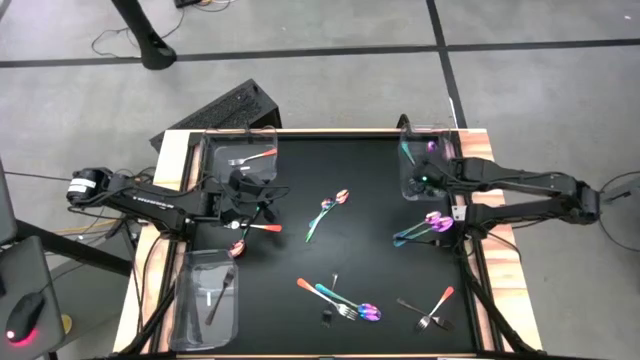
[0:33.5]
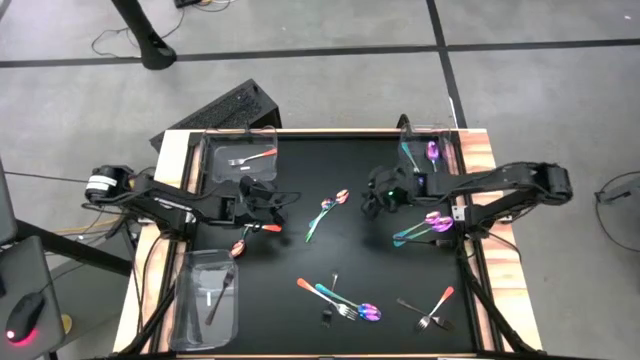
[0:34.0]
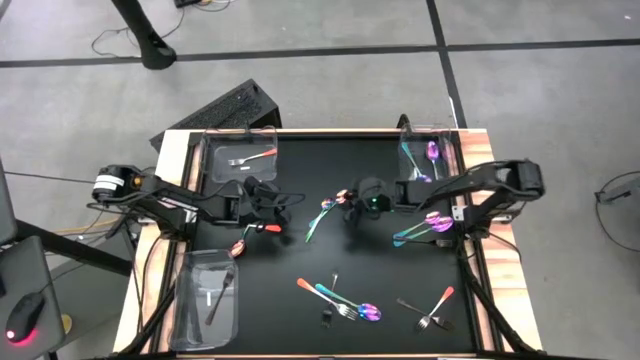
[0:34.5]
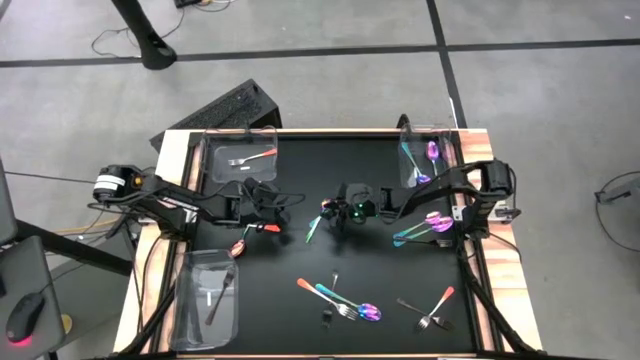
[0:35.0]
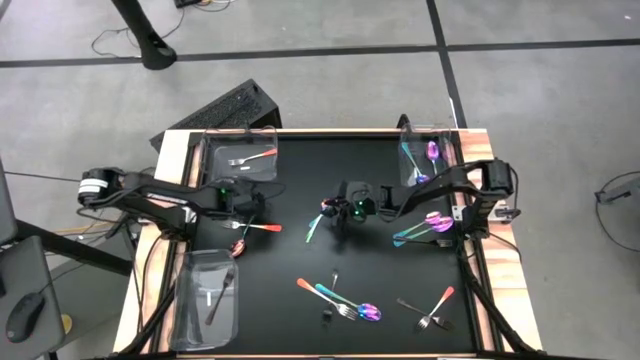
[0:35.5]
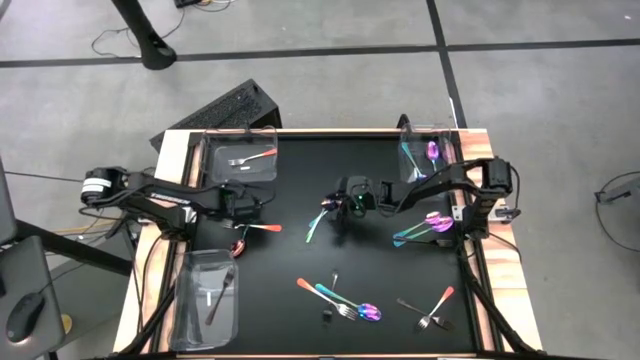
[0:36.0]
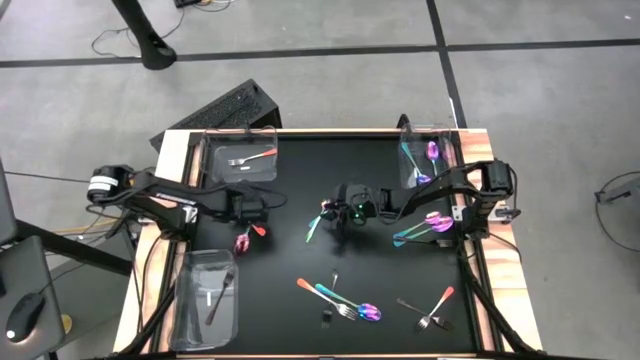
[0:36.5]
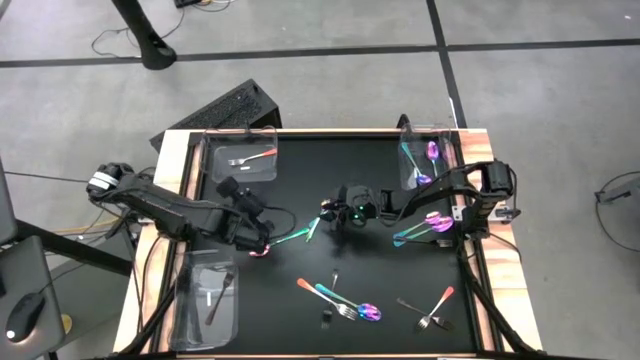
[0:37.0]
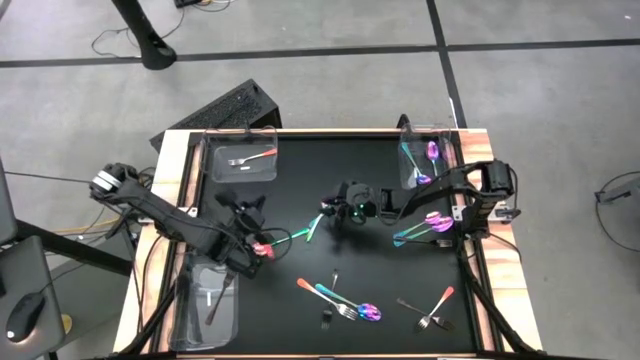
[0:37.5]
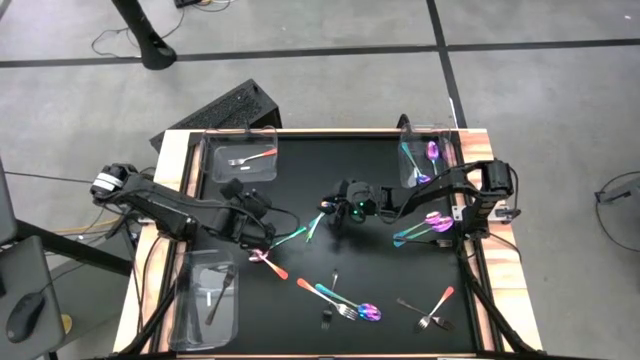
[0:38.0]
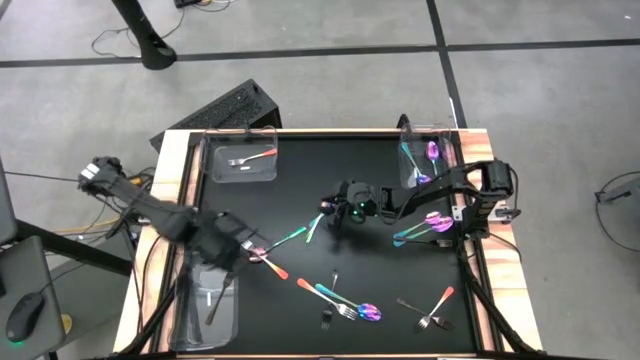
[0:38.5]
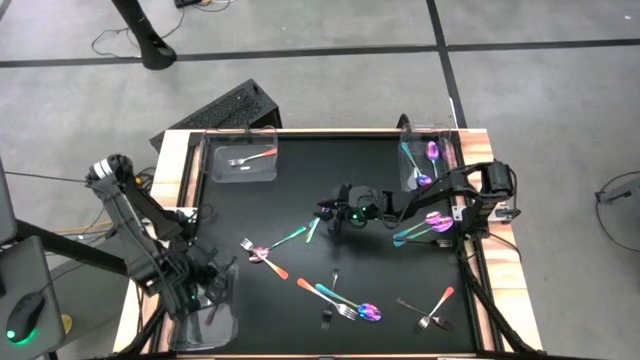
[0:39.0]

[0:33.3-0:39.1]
Task: Sort silverware by color (type)
Put the black fork into the bottom transparent bin

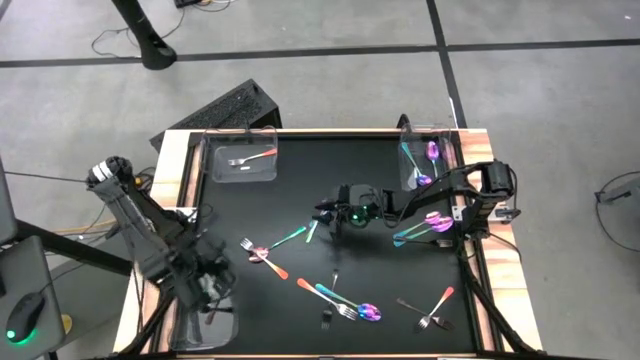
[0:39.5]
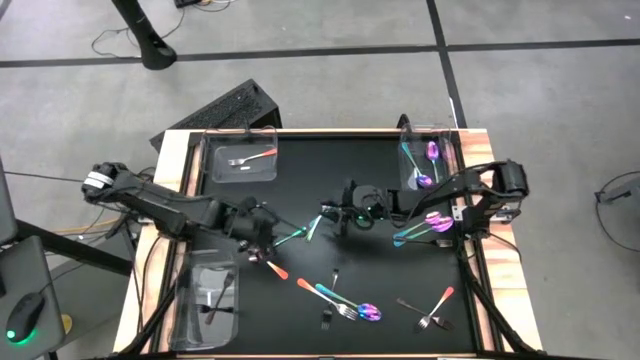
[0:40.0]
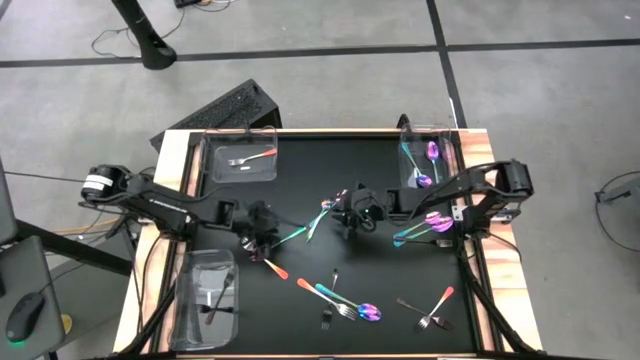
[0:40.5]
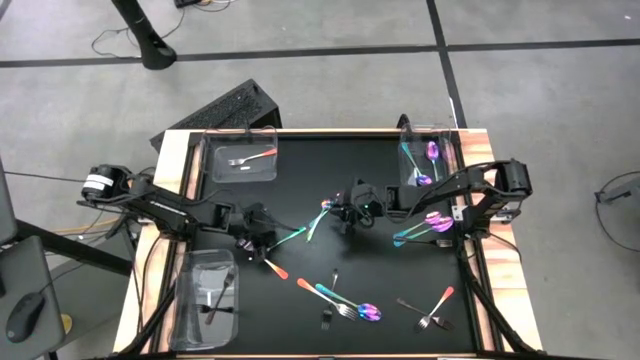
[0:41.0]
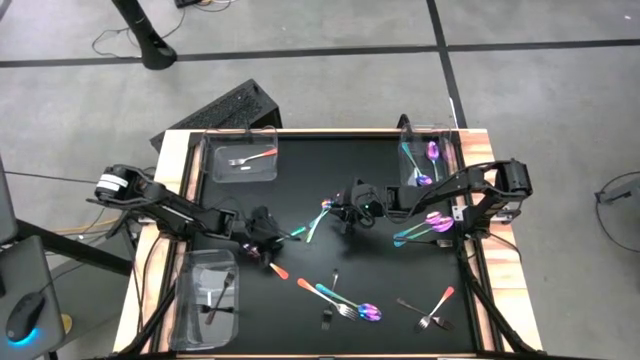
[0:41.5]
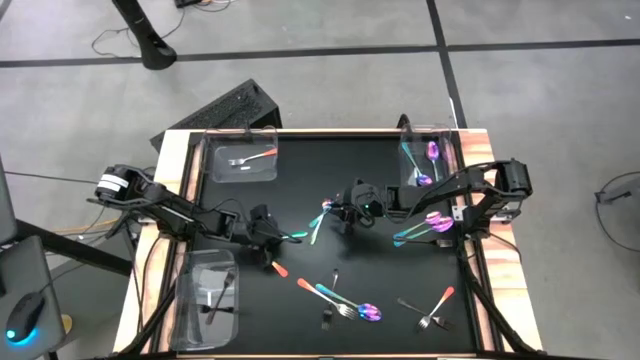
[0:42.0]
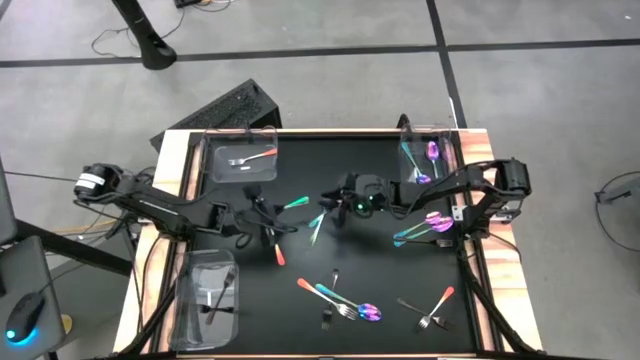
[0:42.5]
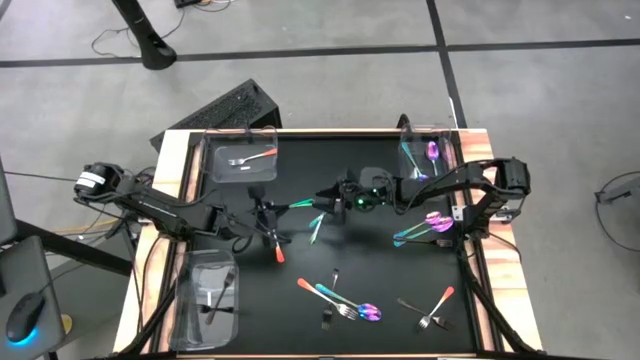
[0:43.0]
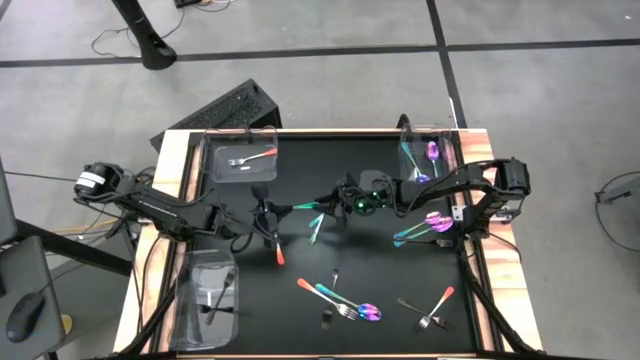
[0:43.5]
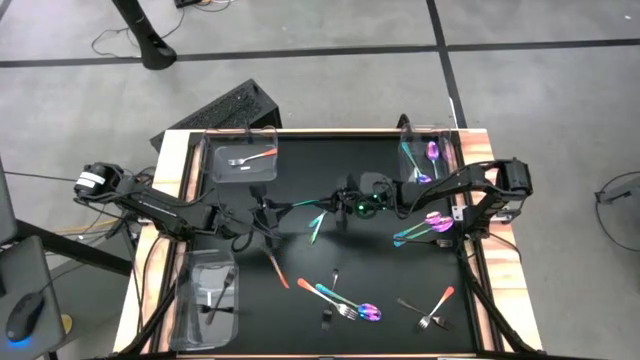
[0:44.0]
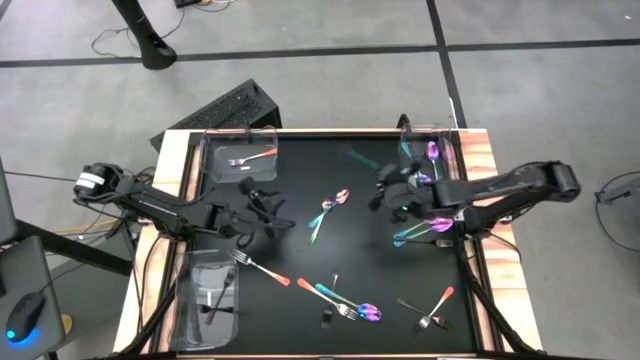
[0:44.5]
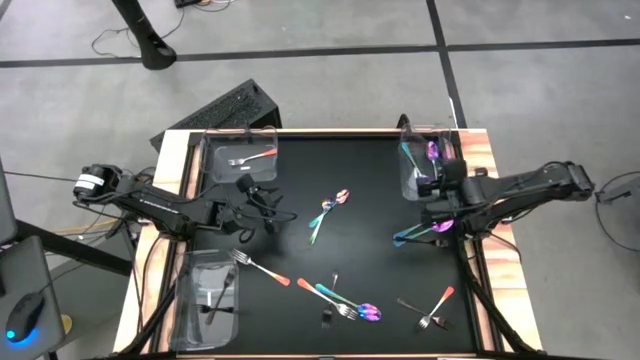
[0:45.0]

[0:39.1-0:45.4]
Put the violet spoon into the top right transparent bin

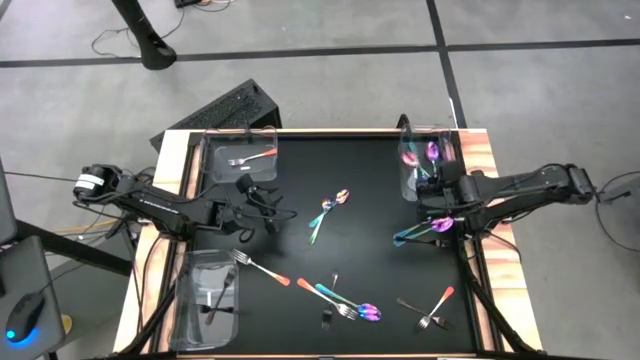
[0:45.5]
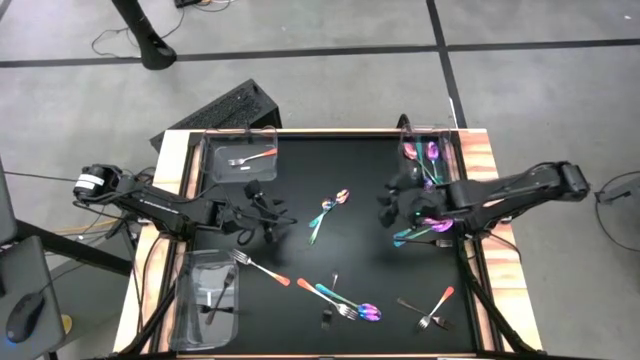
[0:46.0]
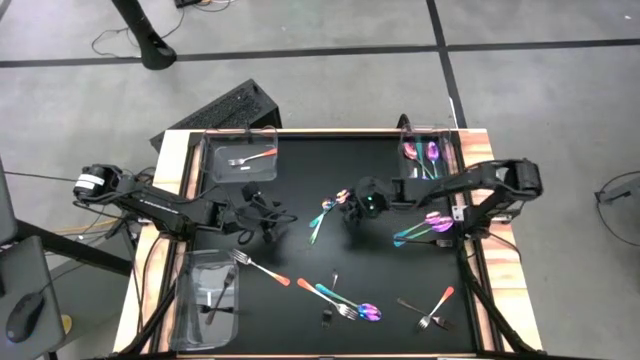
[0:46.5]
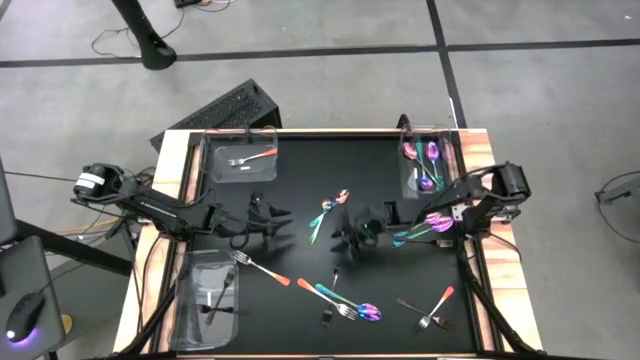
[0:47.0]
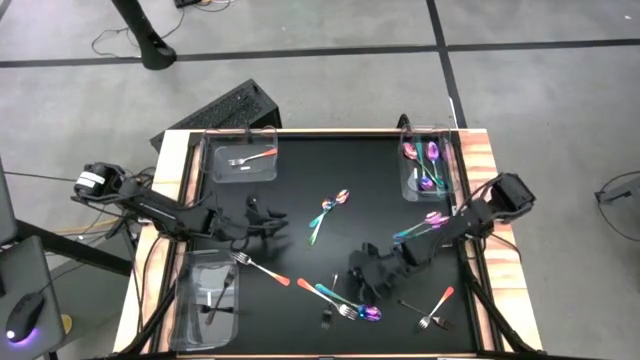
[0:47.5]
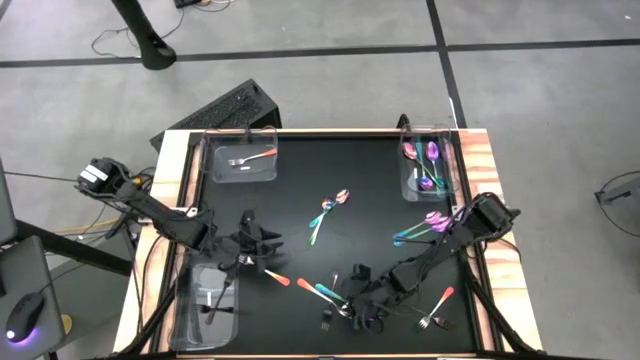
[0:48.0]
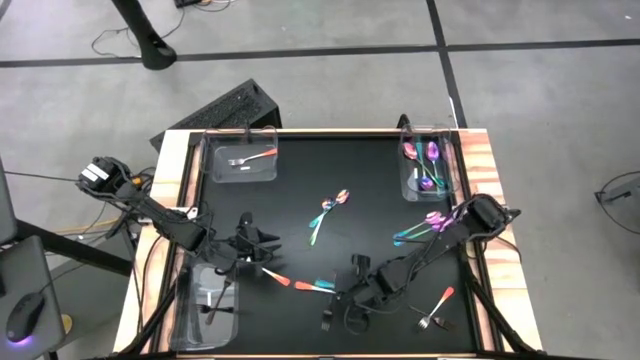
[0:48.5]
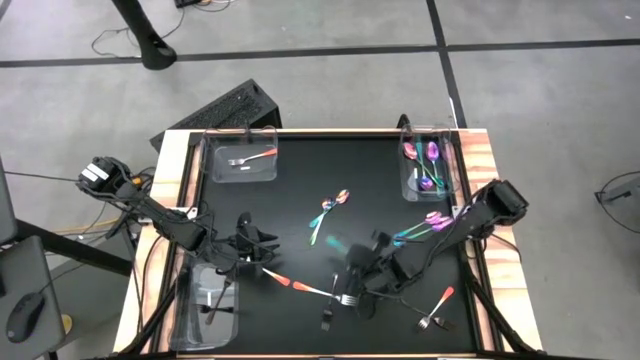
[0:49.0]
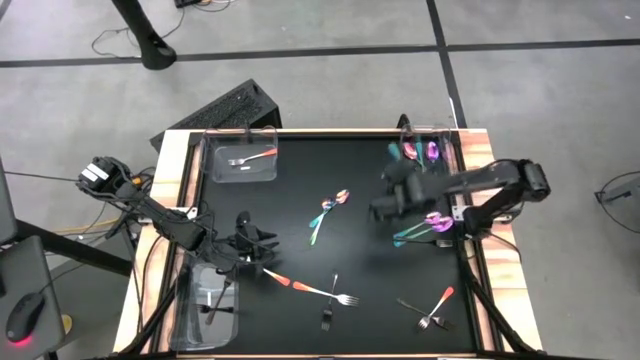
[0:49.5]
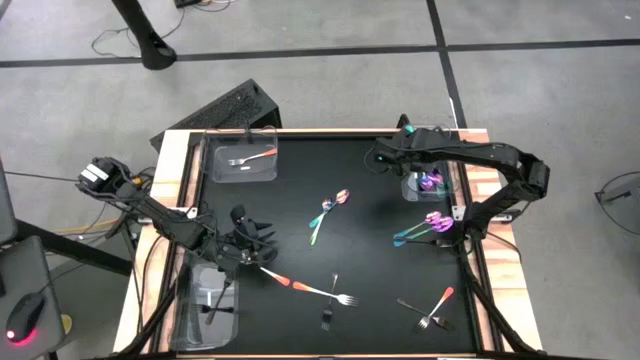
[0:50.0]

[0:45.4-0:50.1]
Put the violet spoon into the top right transparent bin

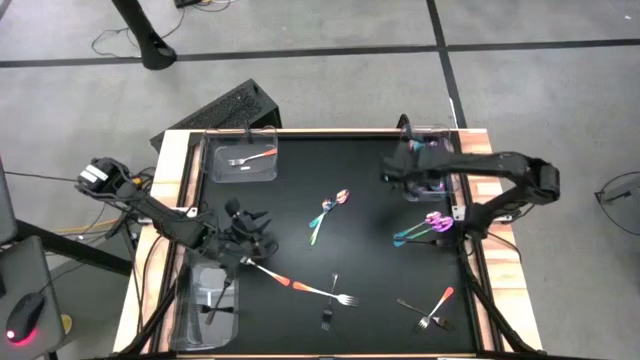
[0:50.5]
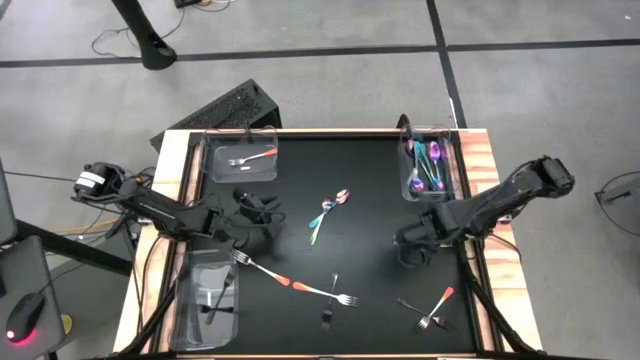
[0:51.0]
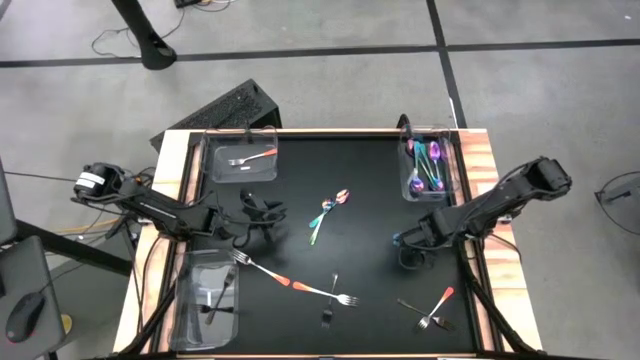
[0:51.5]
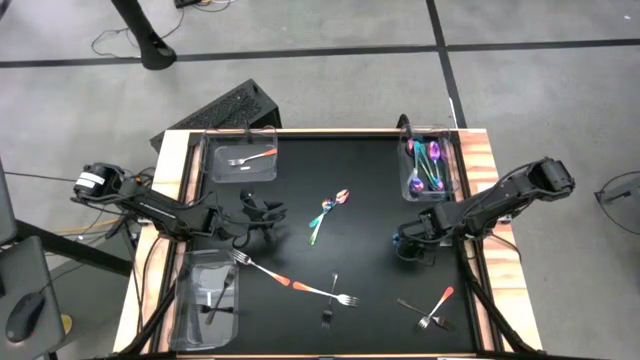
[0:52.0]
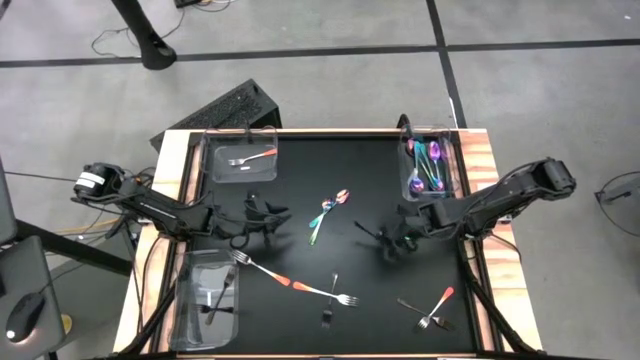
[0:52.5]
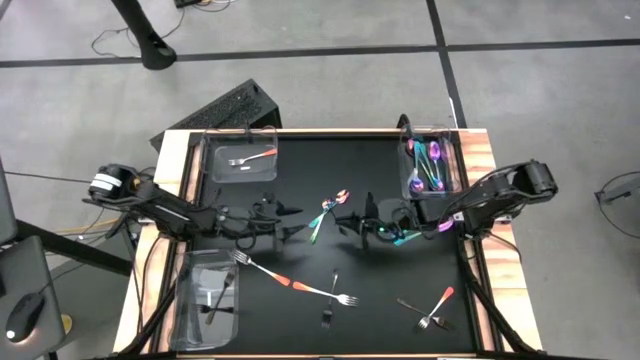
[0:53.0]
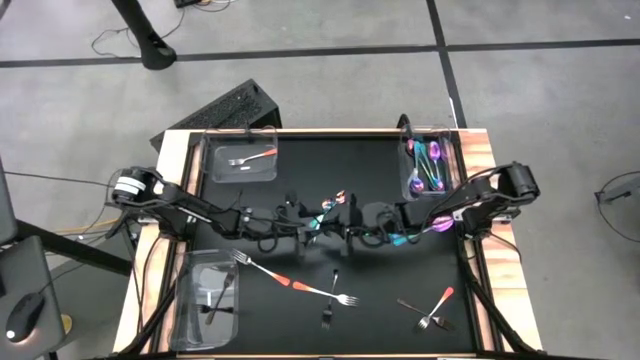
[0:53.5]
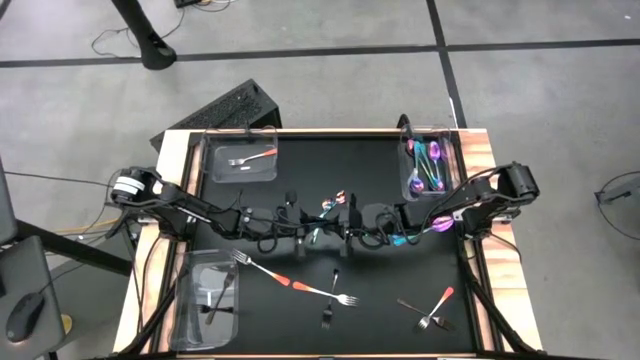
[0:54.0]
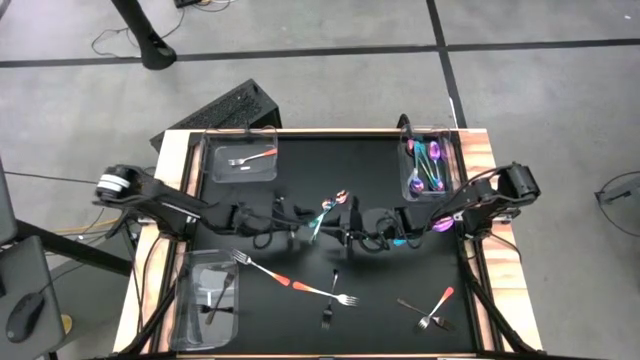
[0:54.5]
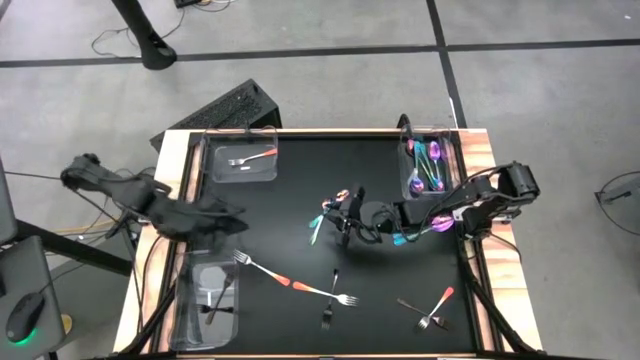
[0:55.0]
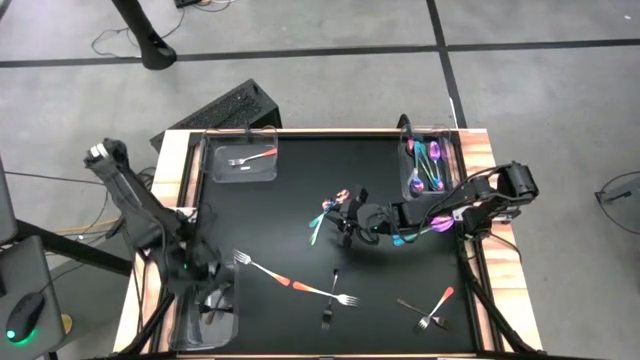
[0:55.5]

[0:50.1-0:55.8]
Put the black fork into the bottom transparent bin
